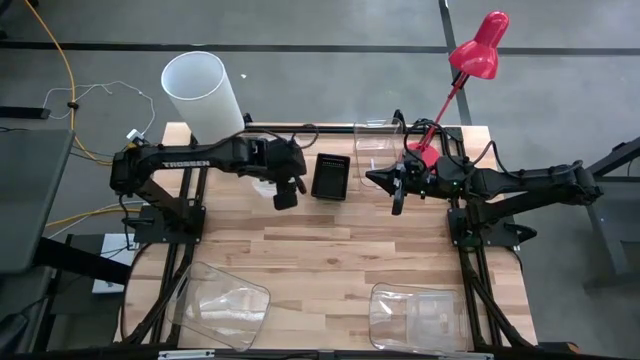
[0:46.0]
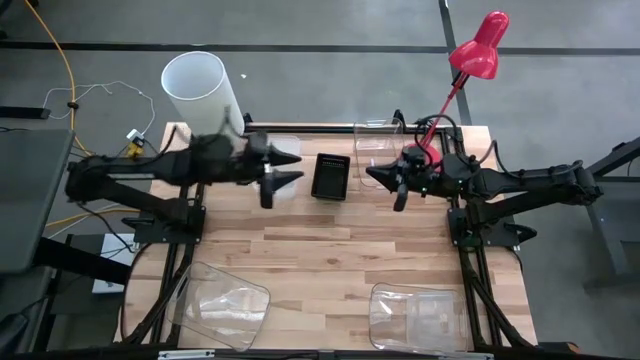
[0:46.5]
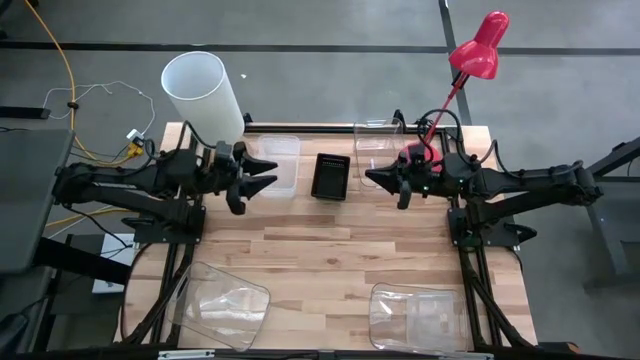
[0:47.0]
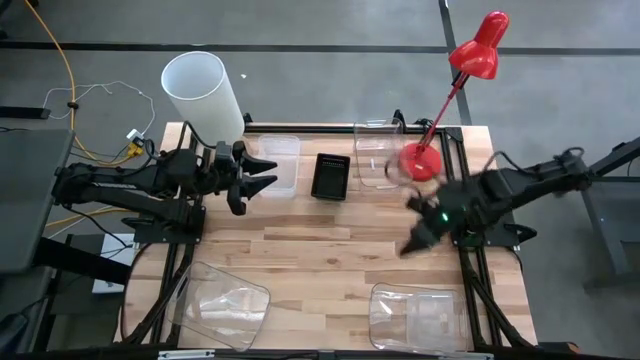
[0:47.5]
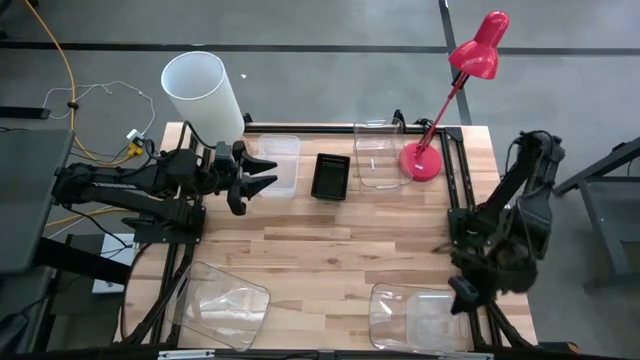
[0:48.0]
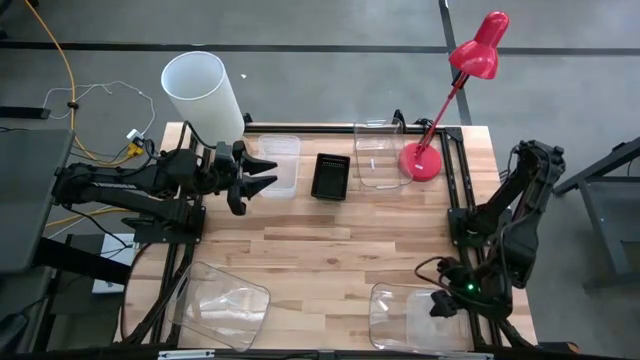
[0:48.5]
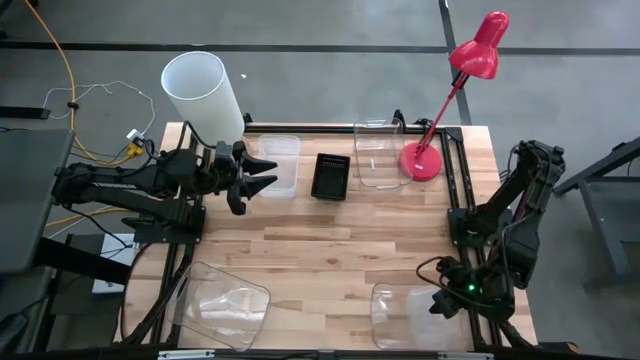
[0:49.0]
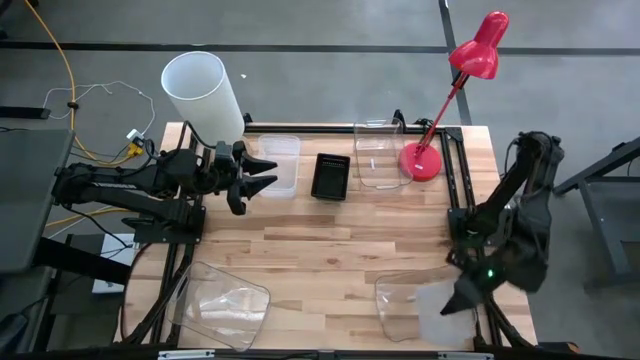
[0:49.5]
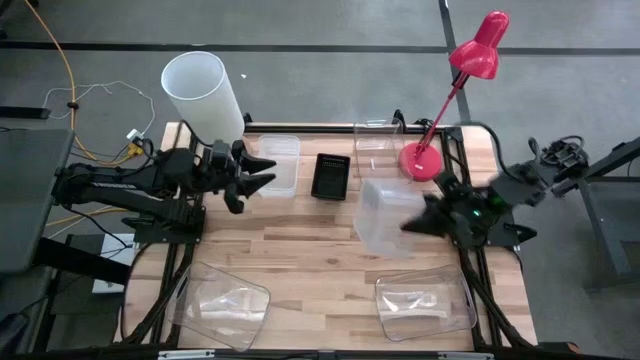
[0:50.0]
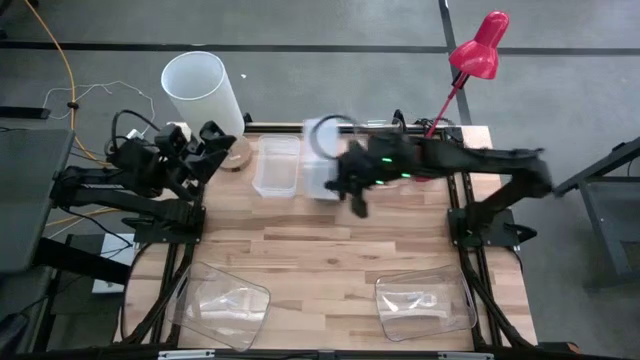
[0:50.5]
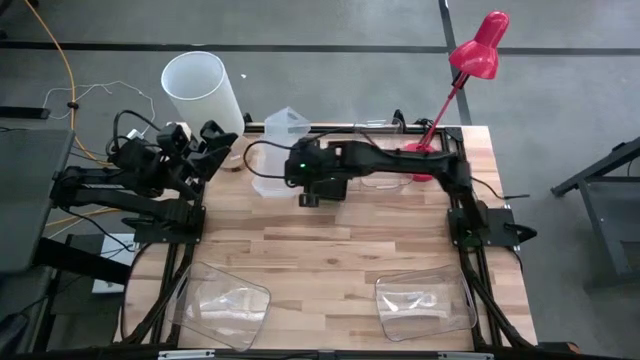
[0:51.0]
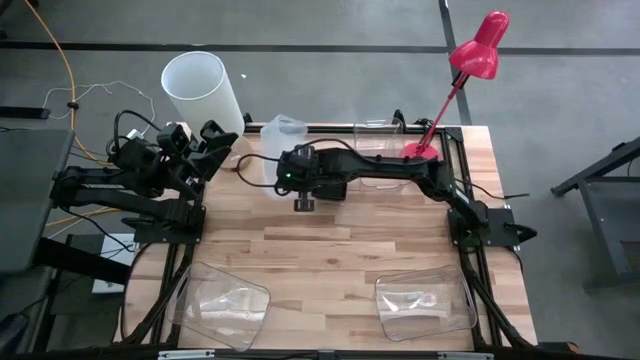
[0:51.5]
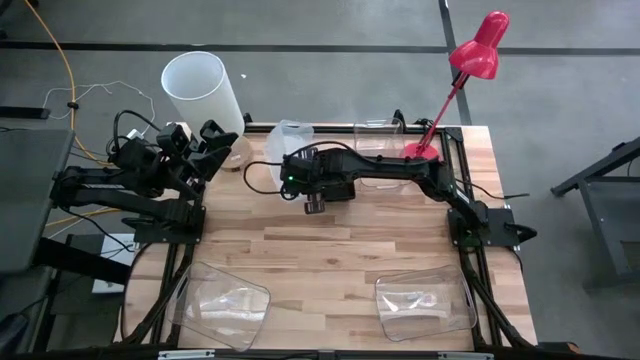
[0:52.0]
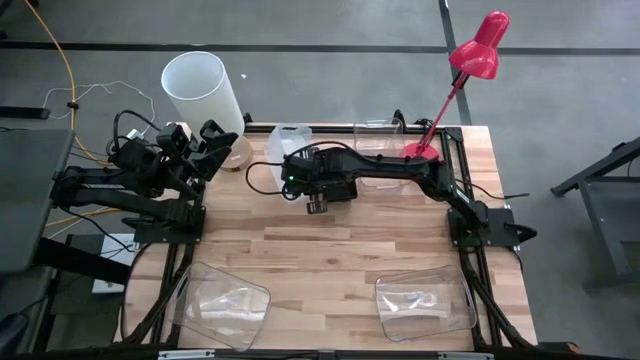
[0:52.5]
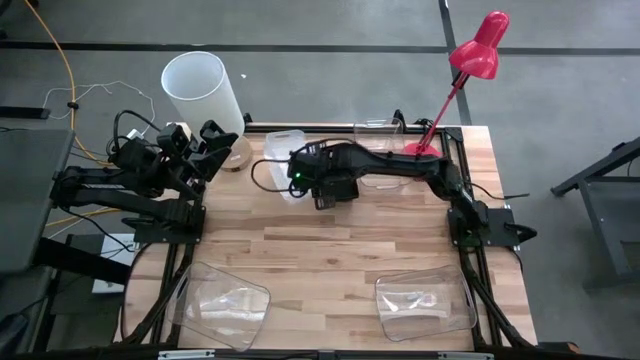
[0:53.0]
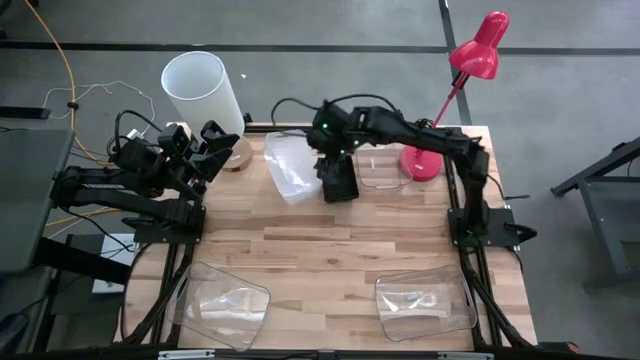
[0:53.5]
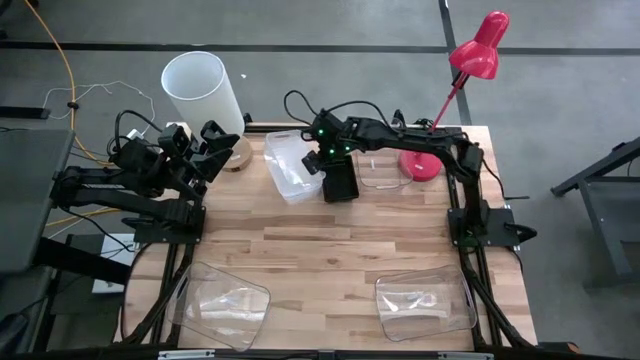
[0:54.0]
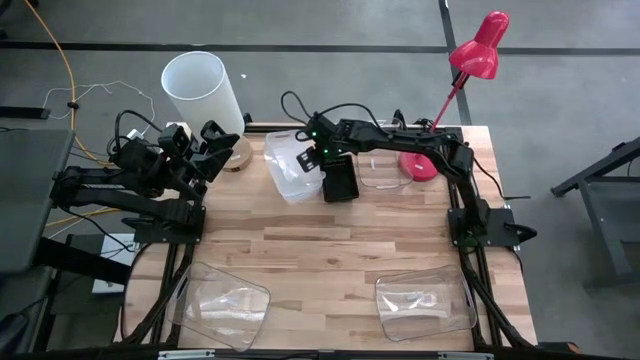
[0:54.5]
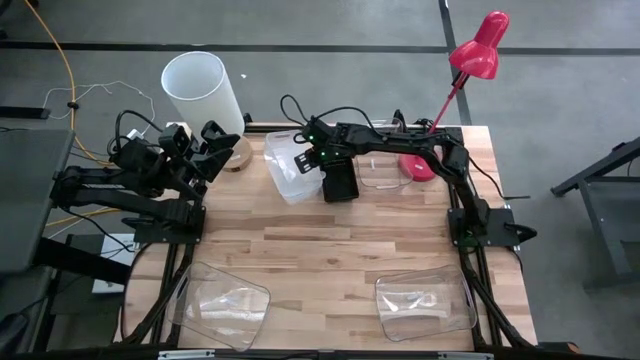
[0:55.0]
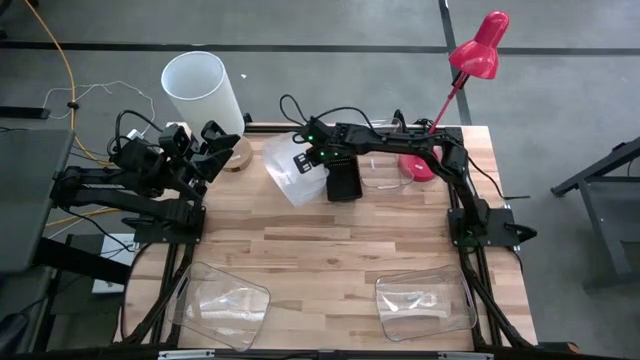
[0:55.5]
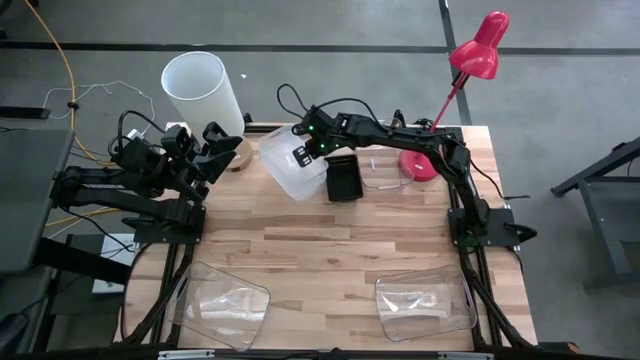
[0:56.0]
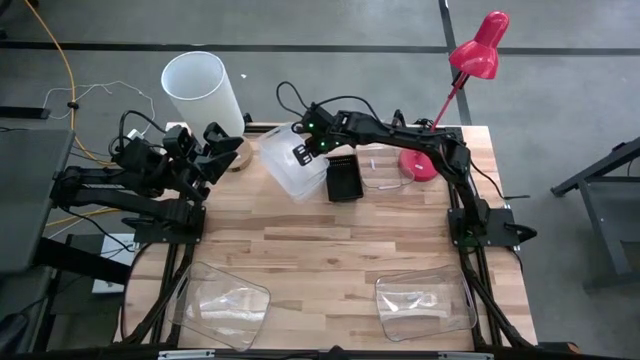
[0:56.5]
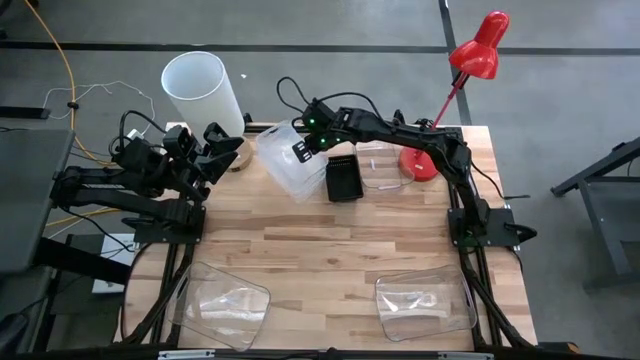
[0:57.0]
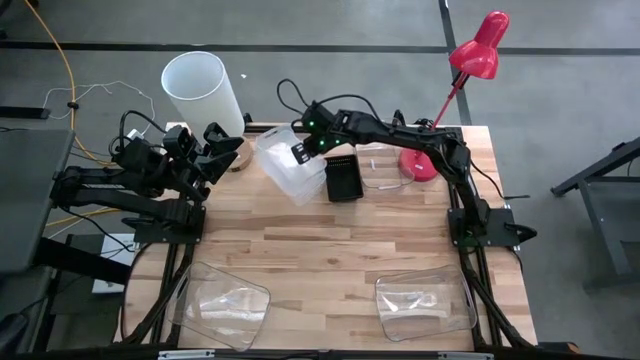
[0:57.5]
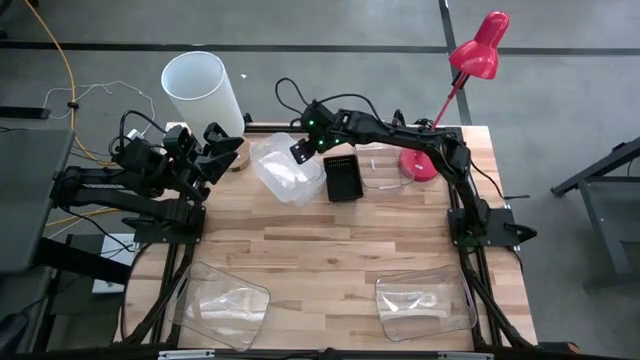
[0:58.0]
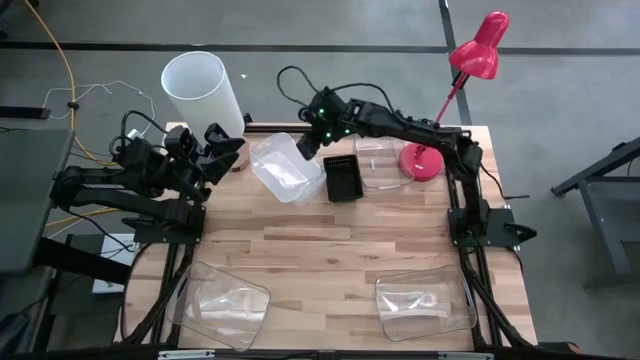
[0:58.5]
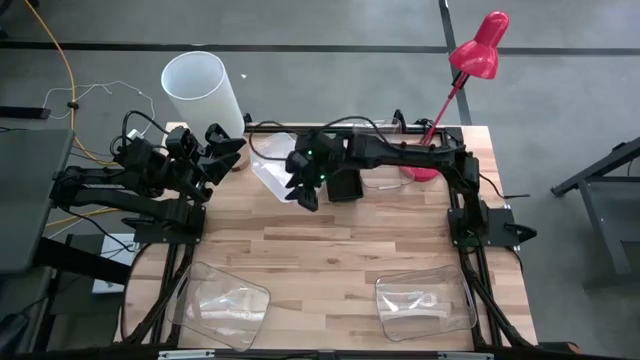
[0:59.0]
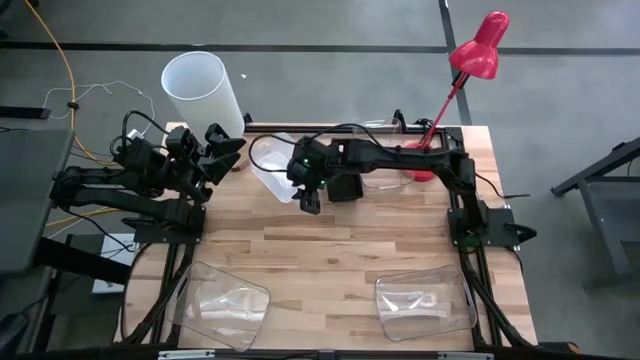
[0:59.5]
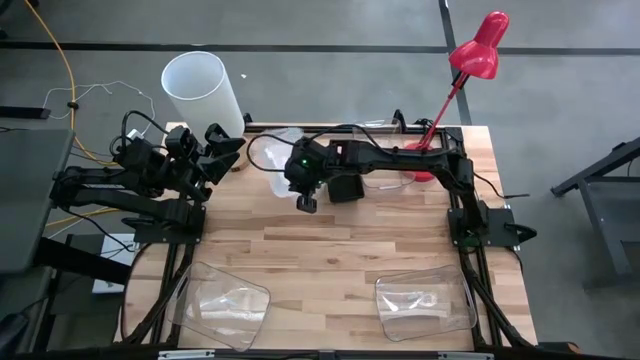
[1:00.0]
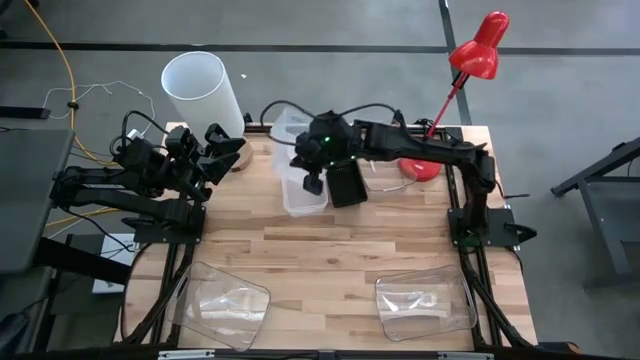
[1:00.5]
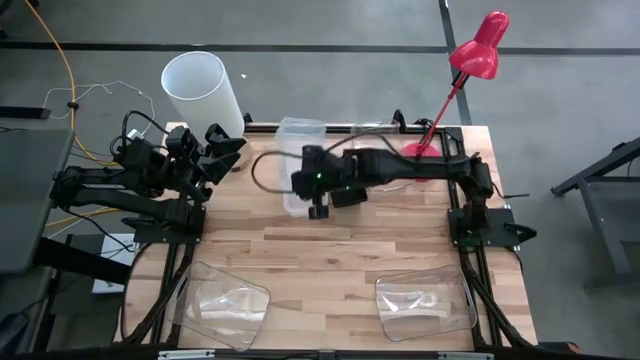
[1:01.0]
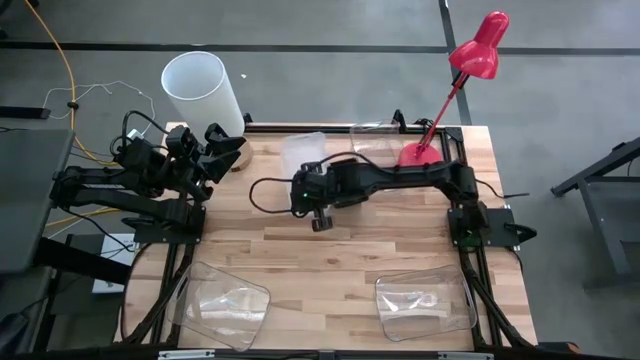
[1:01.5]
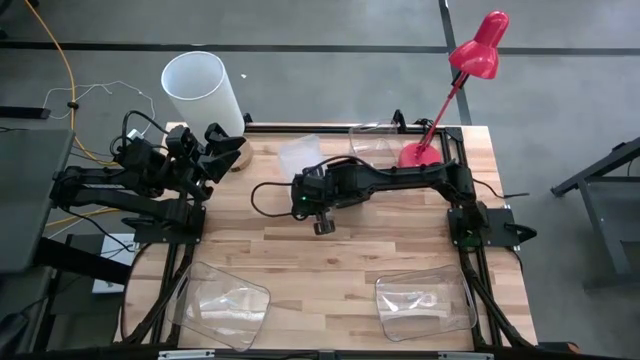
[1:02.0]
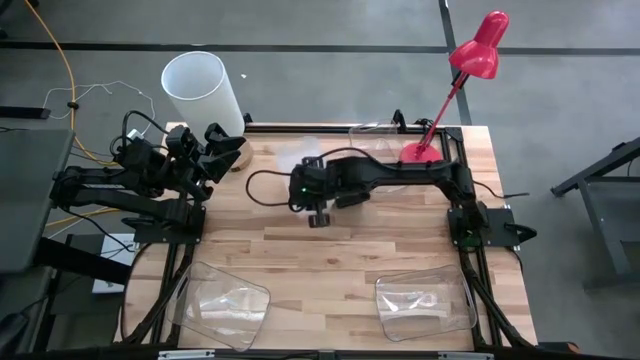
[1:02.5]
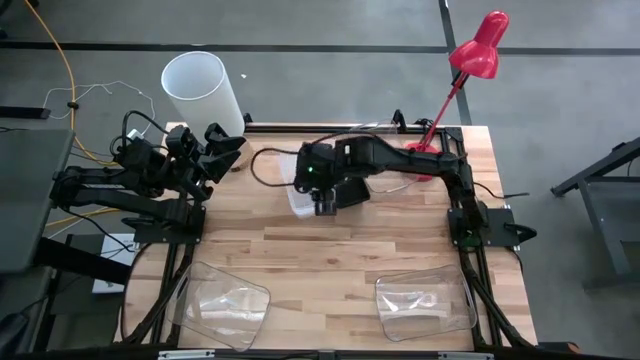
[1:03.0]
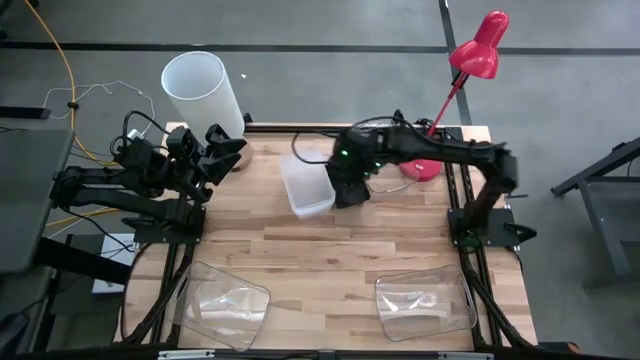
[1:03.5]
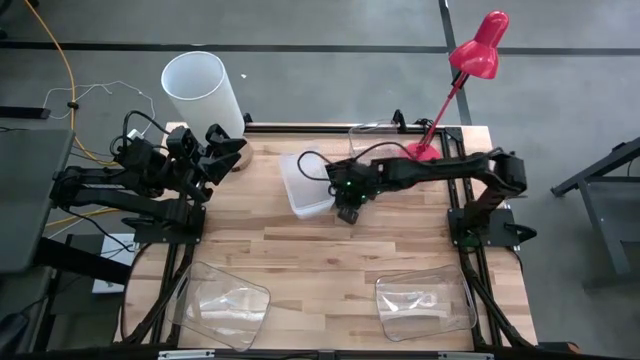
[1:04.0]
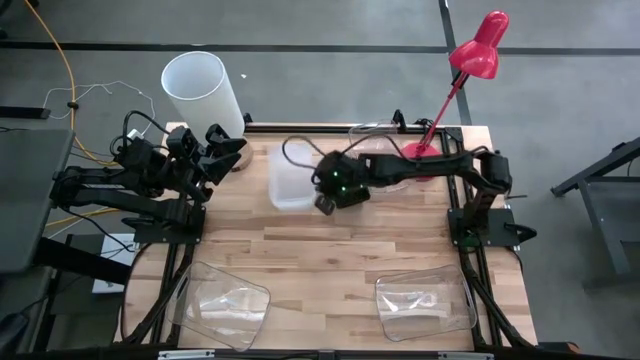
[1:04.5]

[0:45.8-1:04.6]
Stack the white bin on the white bin
